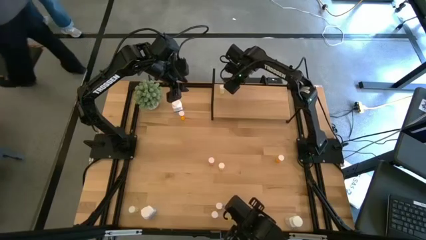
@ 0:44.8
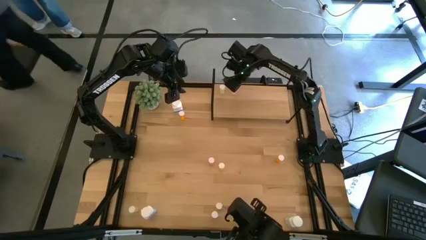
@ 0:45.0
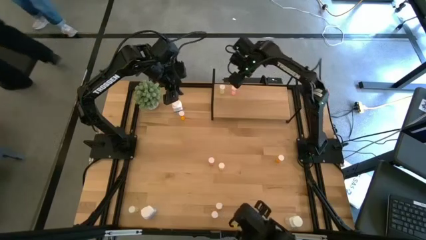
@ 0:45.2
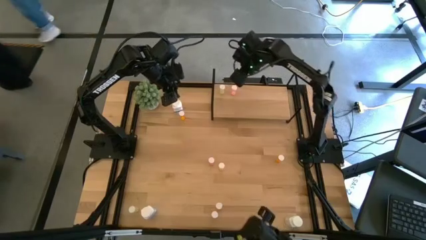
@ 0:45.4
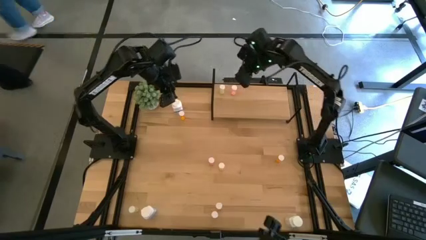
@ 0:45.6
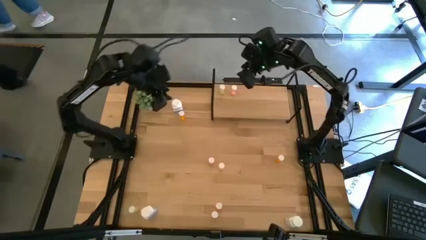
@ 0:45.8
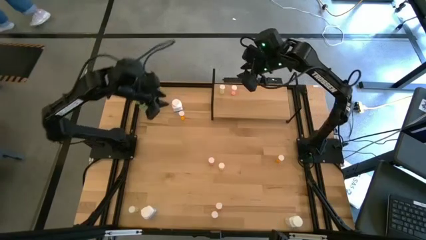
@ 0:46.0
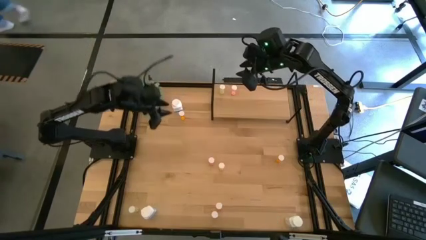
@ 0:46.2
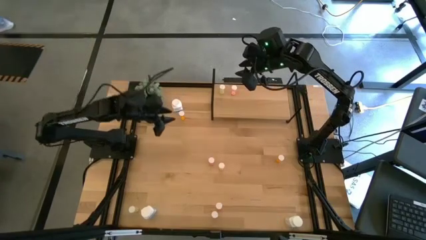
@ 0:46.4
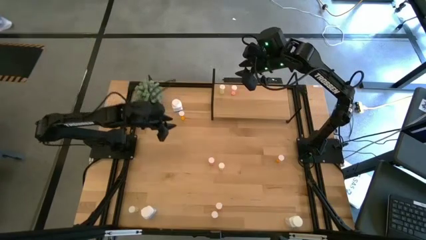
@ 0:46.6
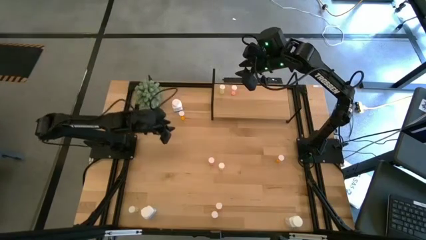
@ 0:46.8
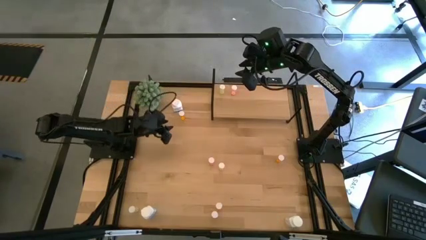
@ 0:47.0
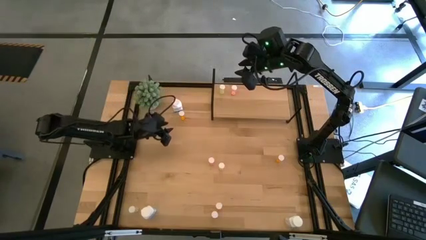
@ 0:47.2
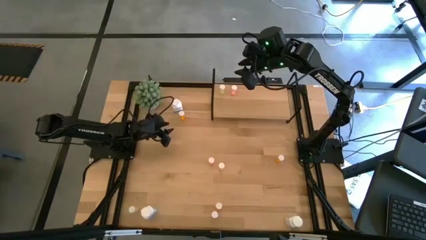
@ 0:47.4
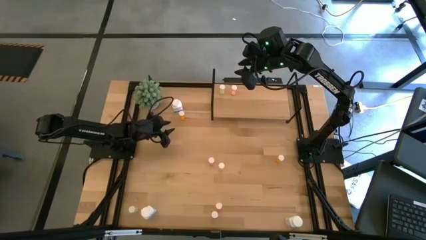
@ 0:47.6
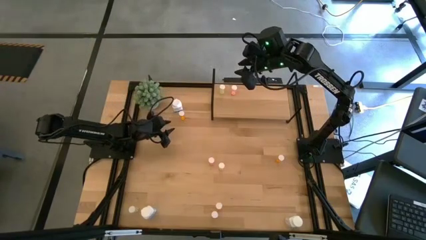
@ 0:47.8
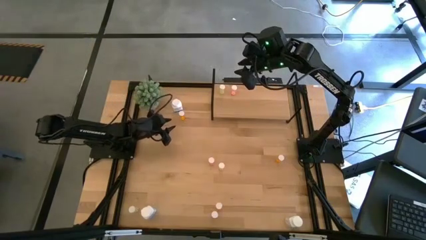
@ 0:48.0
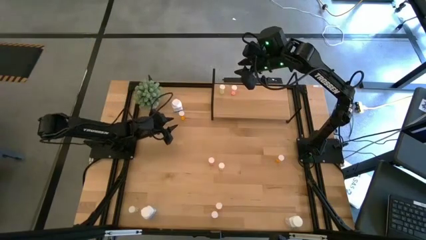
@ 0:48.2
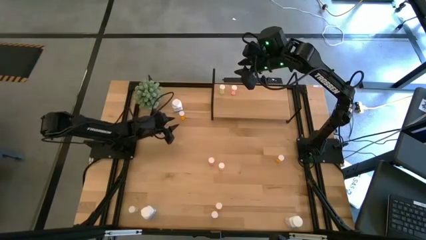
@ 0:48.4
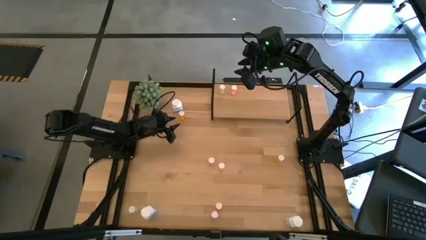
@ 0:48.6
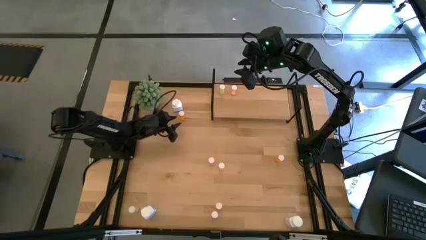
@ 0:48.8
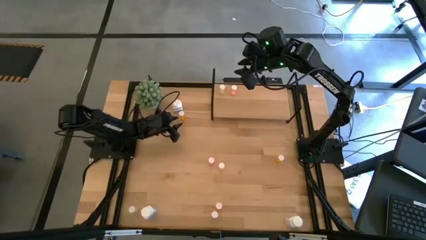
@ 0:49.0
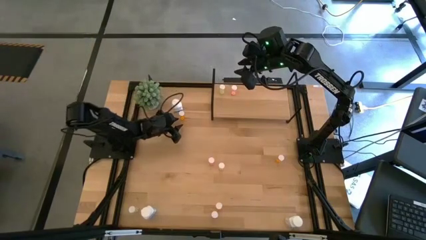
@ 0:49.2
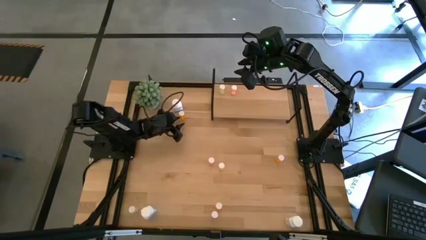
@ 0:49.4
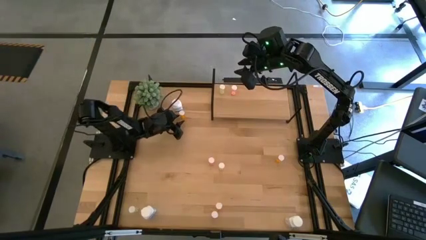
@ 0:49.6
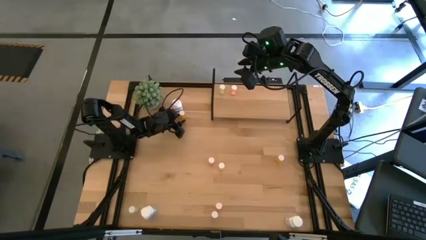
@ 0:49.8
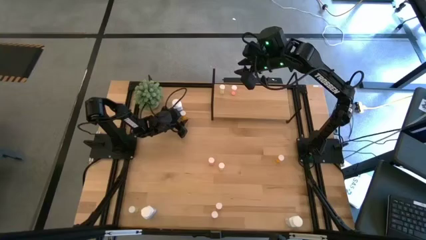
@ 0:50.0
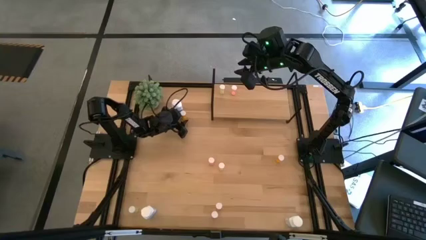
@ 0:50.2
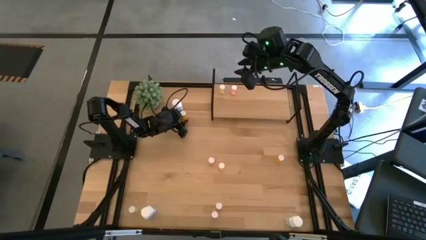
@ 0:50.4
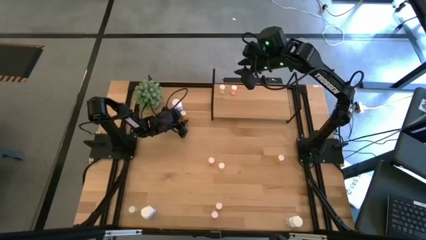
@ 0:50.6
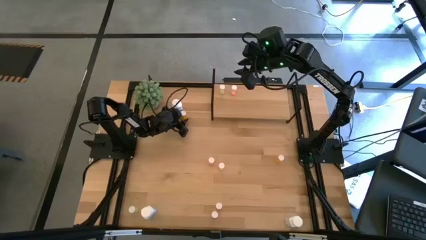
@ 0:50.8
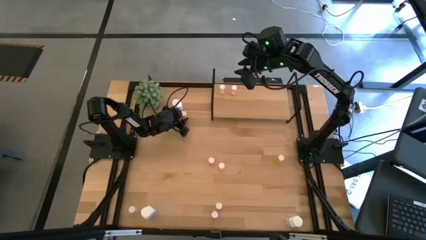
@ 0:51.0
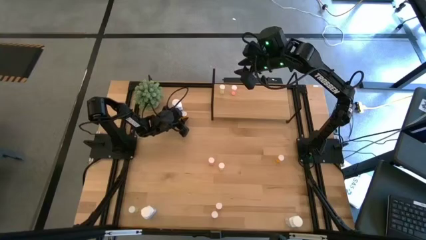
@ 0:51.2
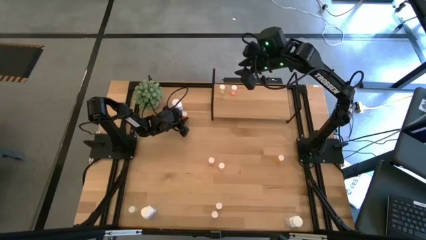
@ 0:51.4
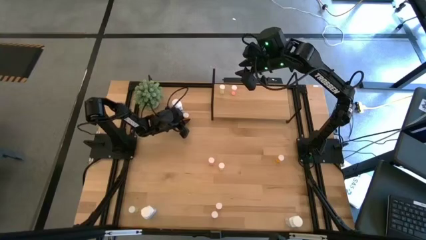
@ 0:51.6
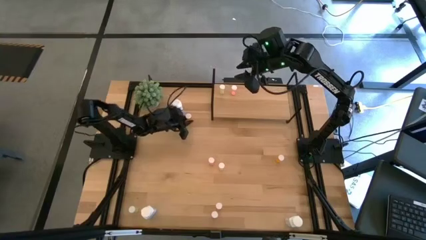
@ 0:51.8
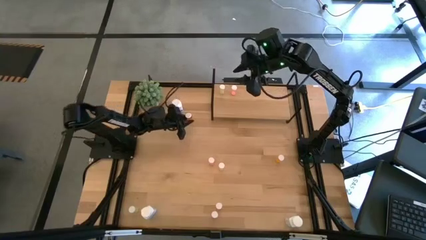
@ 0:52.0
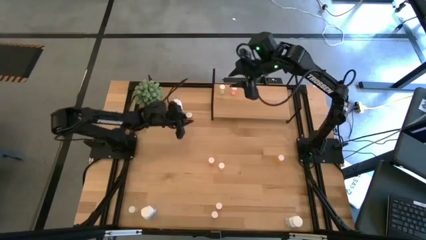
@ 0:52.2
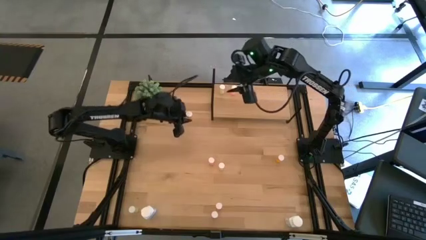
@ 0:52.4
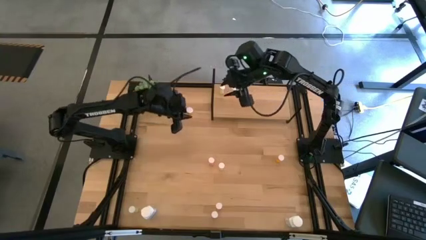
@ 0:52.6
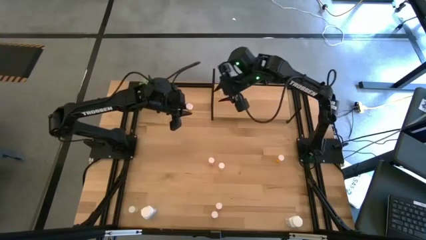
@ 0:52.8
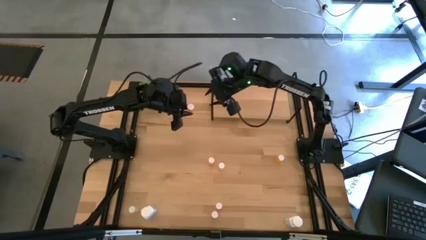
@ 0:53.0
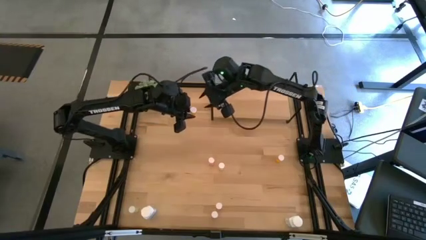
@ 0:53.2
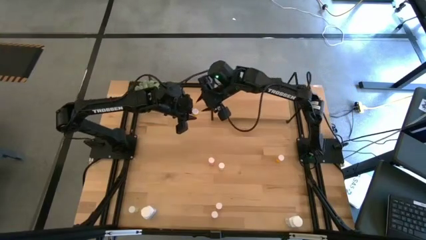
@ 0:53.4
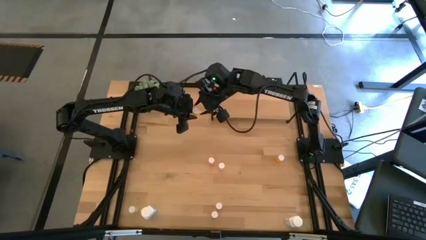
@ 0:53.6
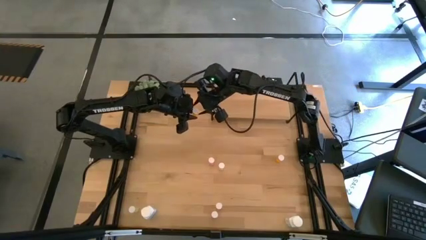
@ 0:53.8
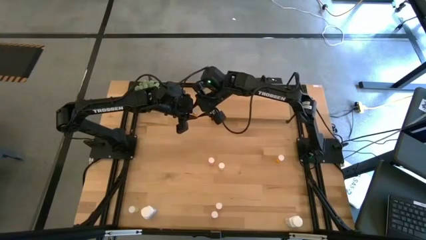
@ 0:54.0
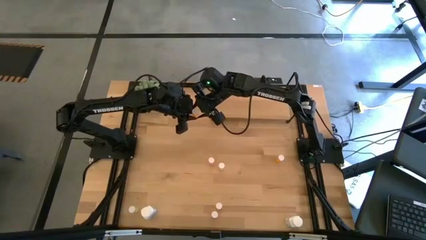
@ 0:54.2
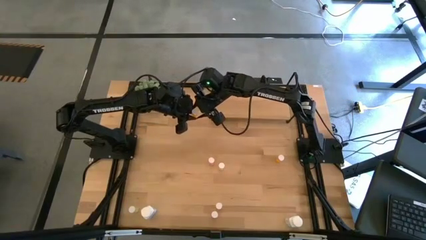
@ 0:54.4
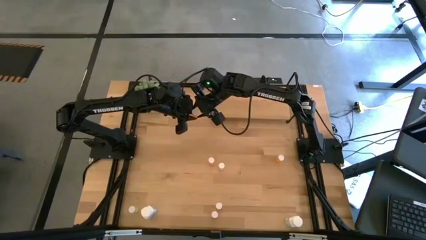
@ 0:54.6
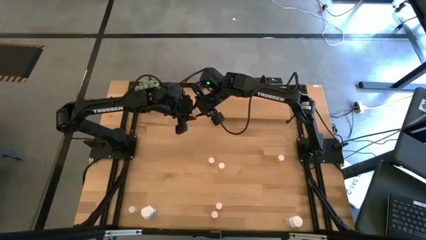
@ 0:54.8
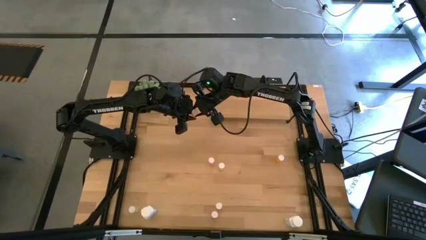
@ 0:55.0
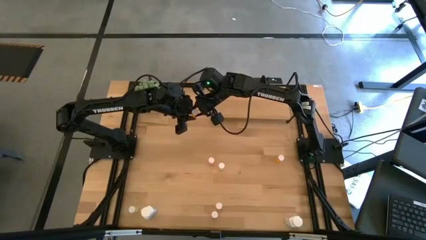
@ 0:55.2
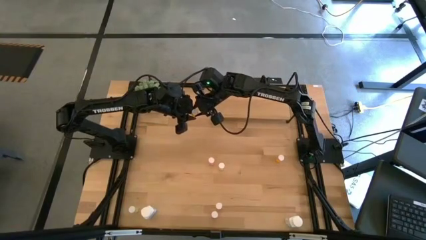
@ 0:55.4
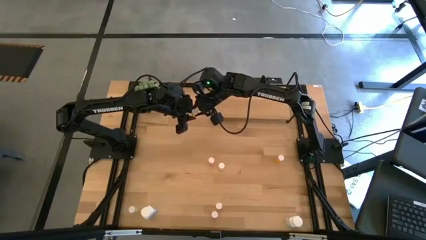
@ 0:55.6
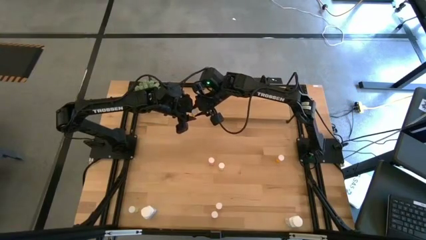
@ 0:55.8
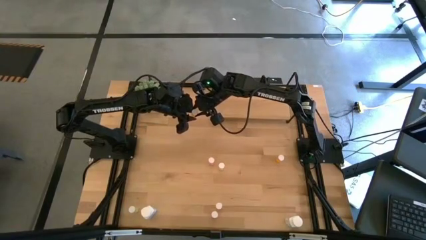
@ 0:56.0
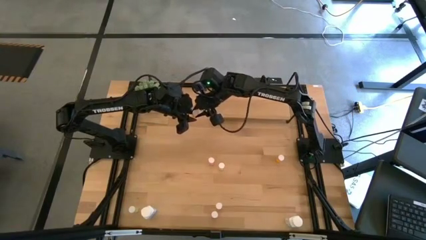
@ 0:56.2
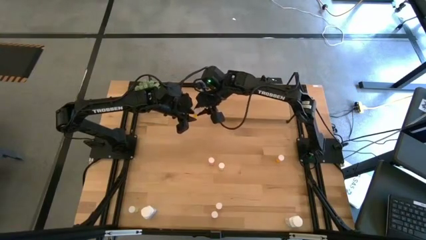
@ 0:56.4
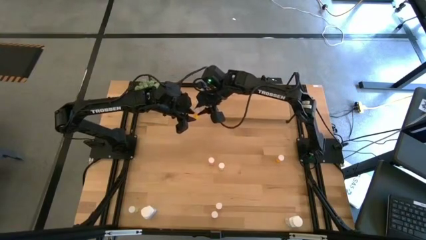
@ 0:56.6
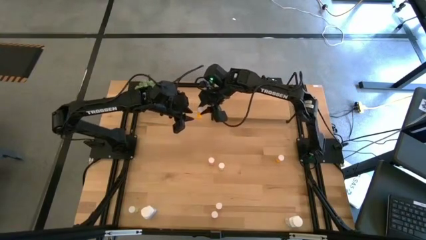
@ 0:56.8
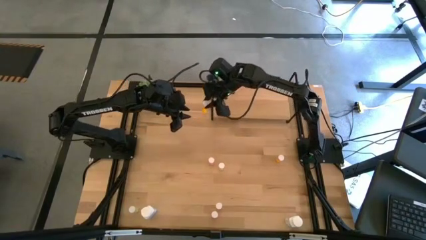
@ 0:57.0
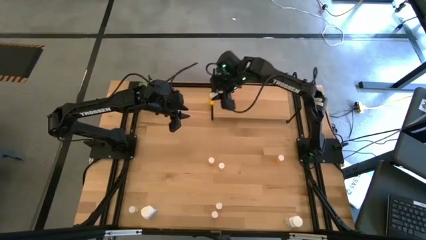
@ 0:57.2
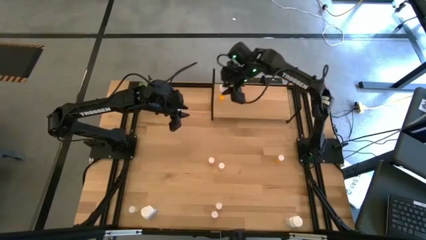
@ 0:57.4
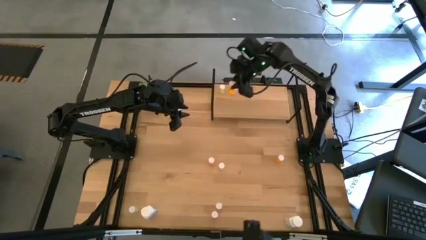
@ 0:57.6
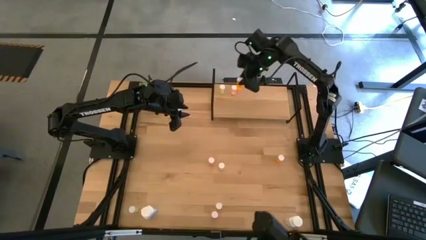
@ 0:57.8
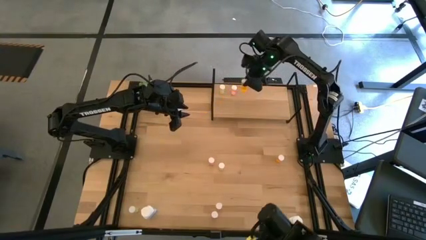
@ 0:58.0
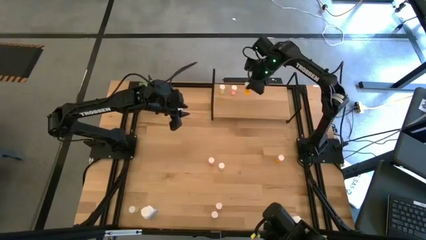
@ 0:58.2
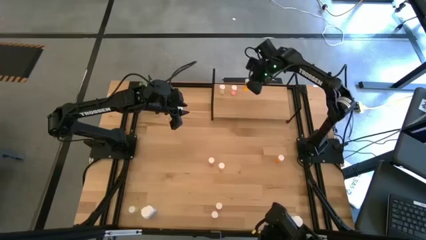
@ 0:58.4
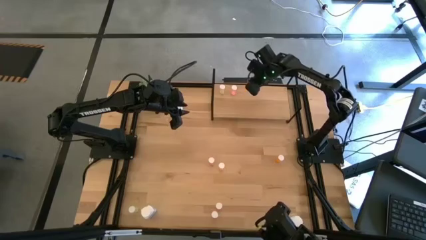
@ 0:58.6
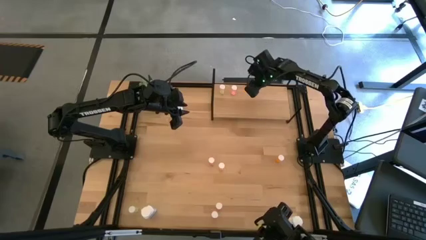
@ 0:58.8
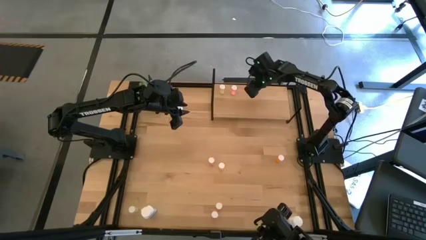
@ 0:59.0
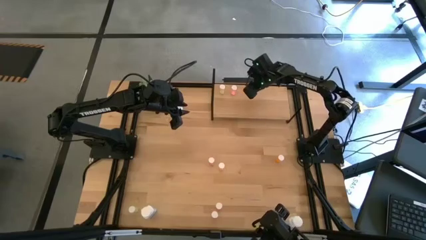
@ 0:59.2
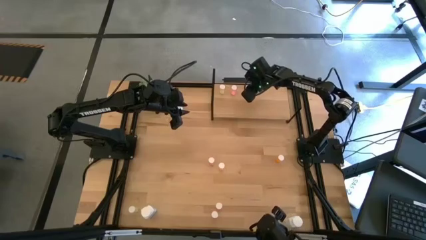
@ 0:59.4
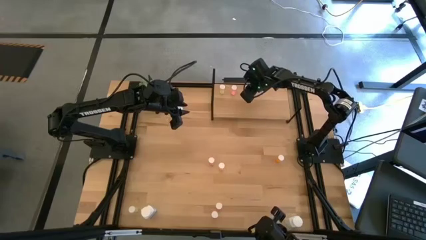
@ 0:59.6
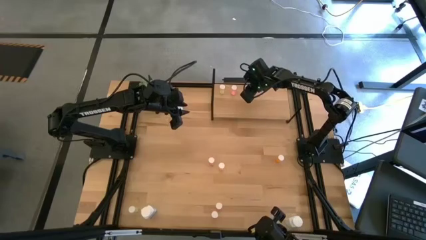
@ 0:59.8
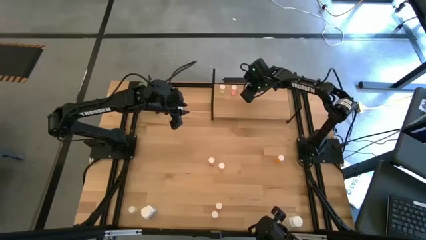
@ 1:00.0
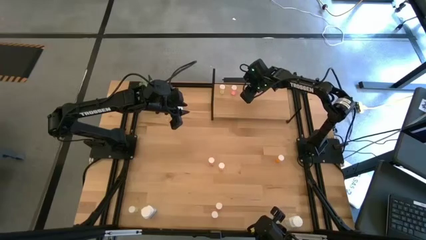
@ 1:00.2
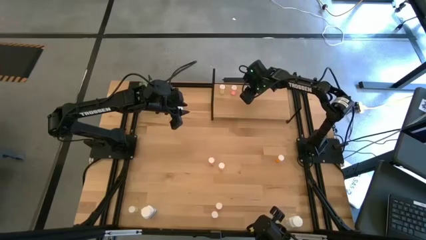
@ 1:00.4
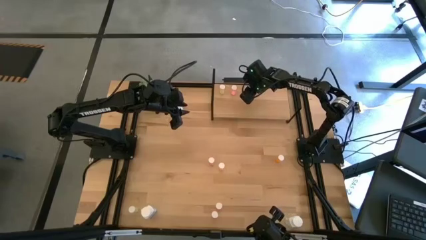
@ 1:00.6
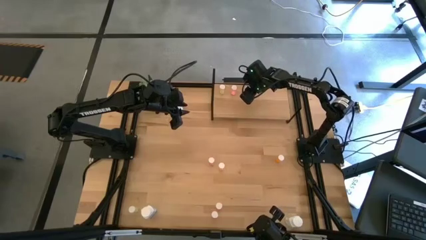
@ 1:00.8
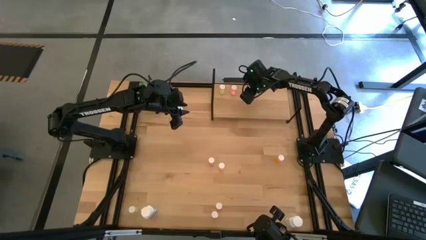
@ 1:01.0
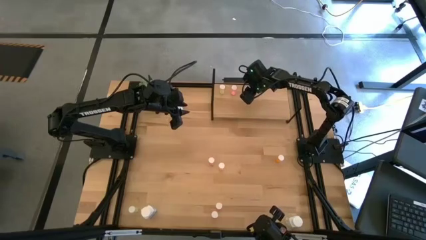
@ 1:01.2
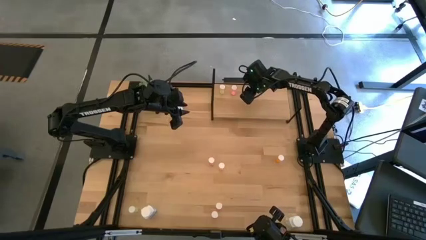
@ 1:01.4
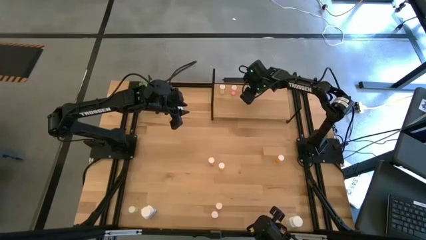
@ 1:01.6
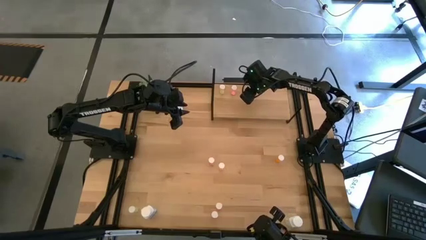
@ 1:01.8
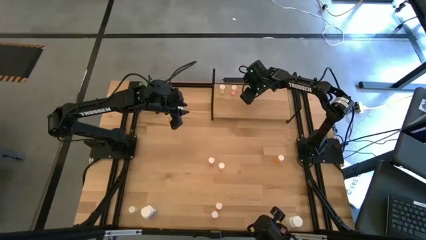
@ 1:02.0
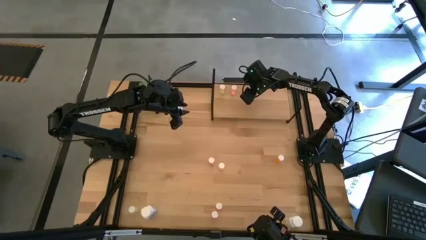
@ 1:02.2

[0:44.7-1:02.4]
Task: Pick and place medicine bottles onto shelf by color
Put the top right orange pill bottle on the shelf
